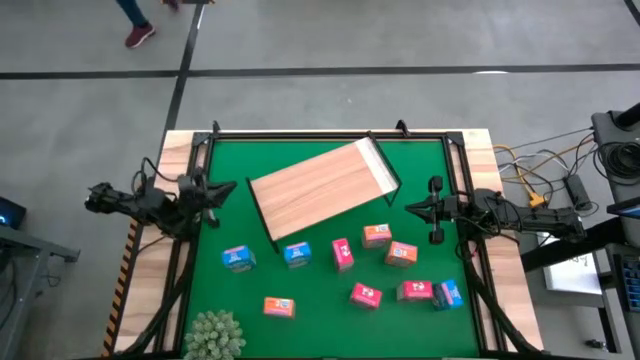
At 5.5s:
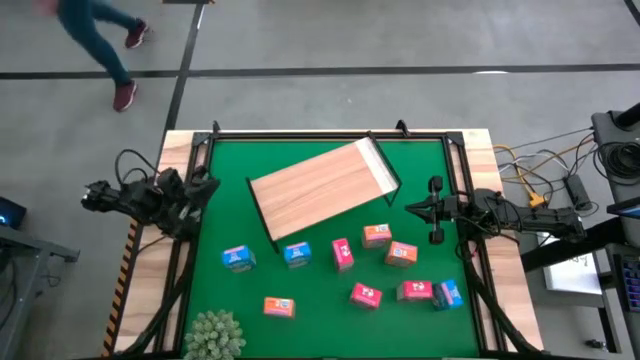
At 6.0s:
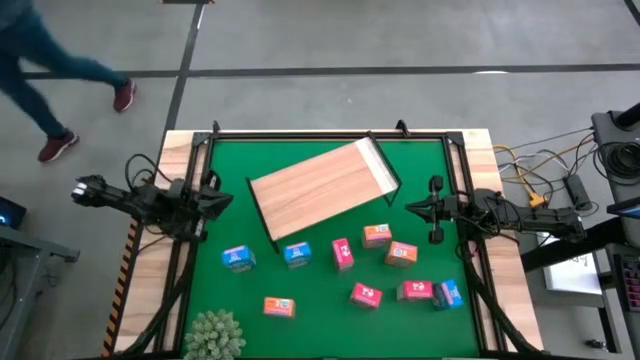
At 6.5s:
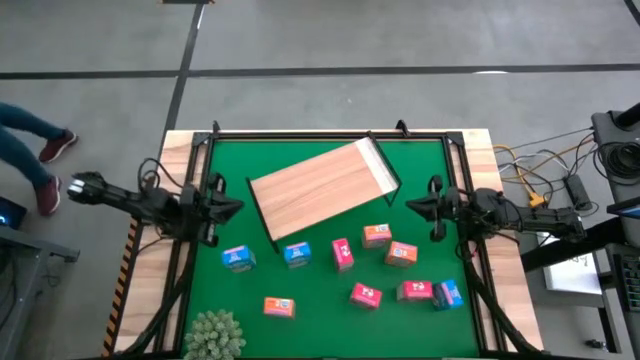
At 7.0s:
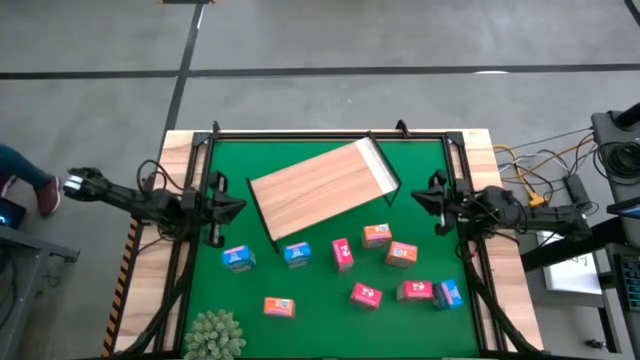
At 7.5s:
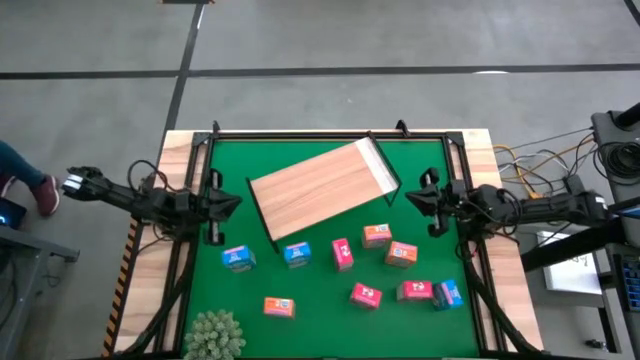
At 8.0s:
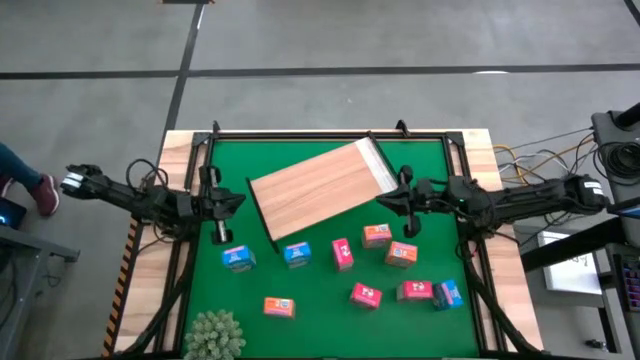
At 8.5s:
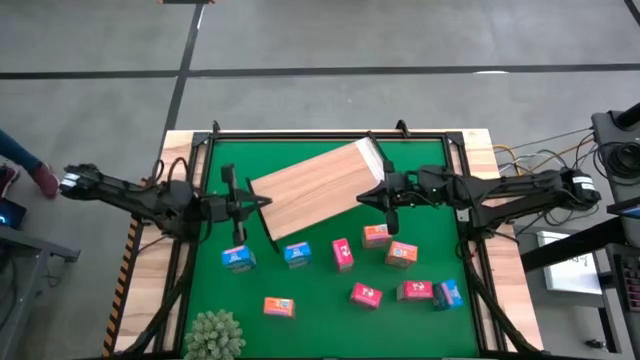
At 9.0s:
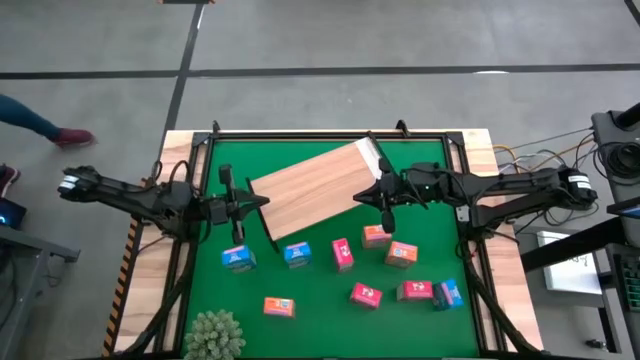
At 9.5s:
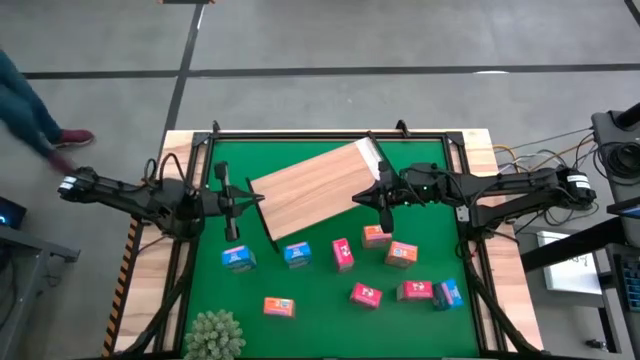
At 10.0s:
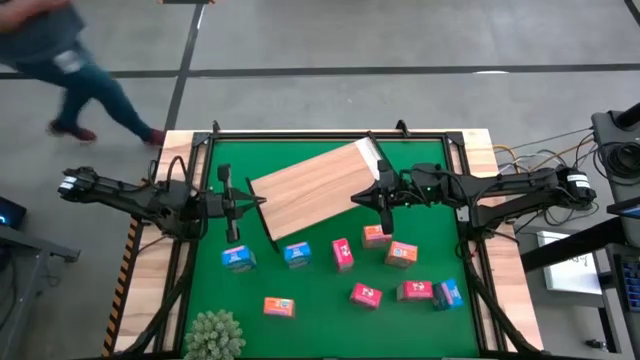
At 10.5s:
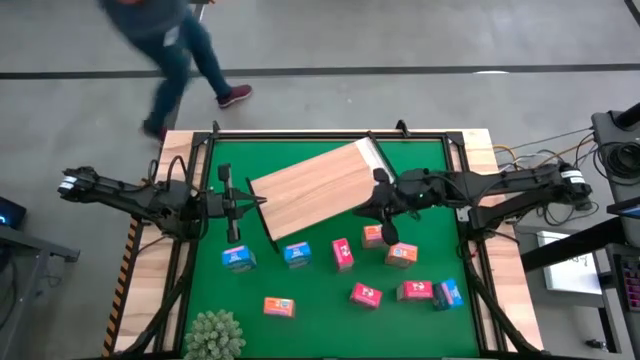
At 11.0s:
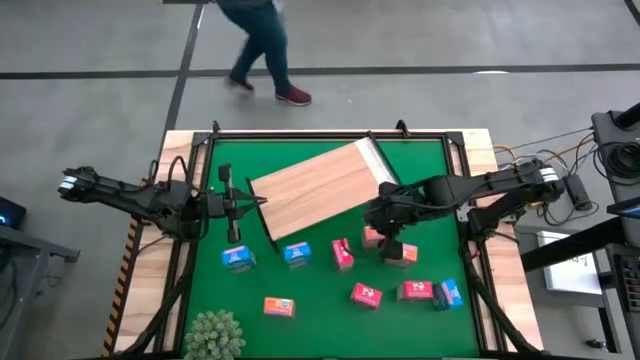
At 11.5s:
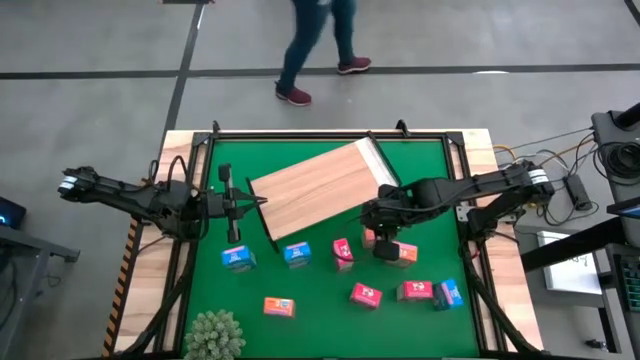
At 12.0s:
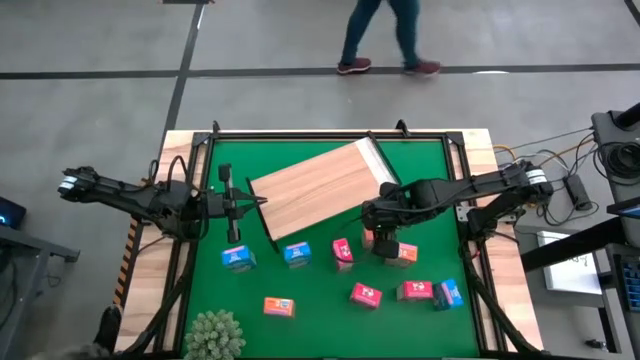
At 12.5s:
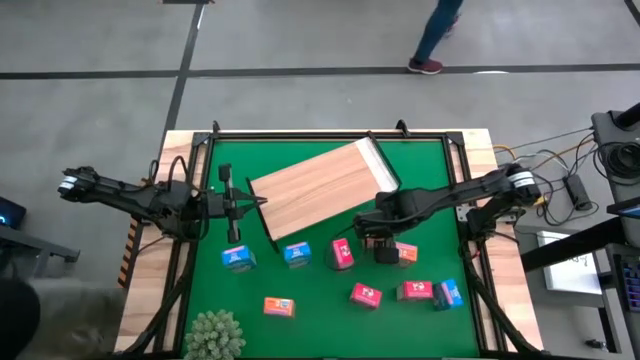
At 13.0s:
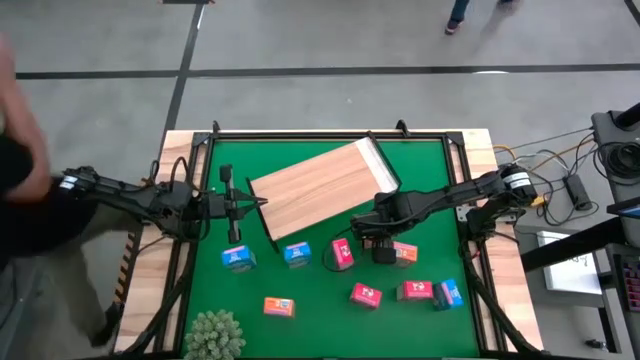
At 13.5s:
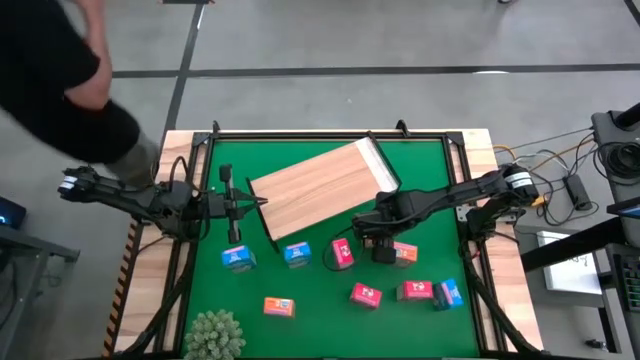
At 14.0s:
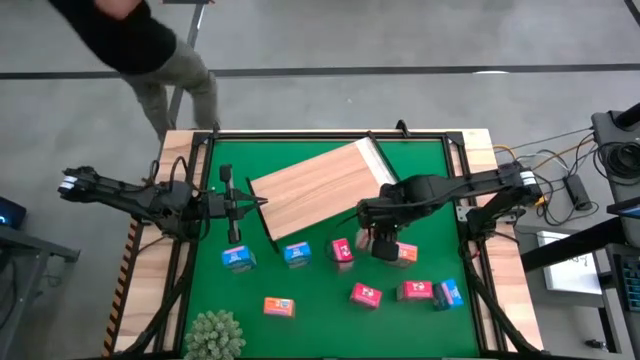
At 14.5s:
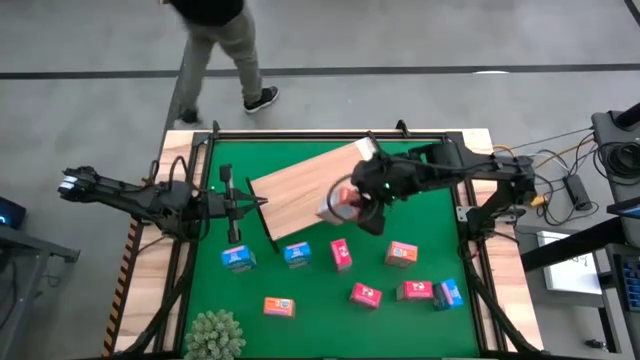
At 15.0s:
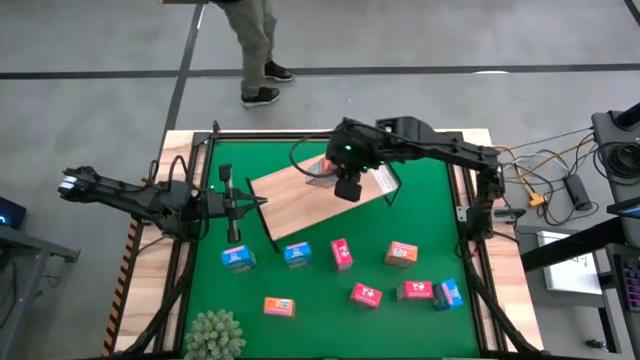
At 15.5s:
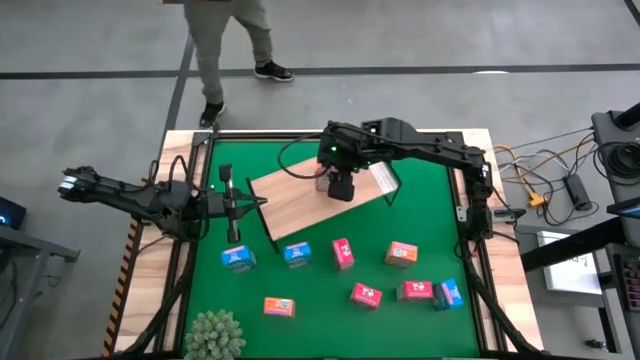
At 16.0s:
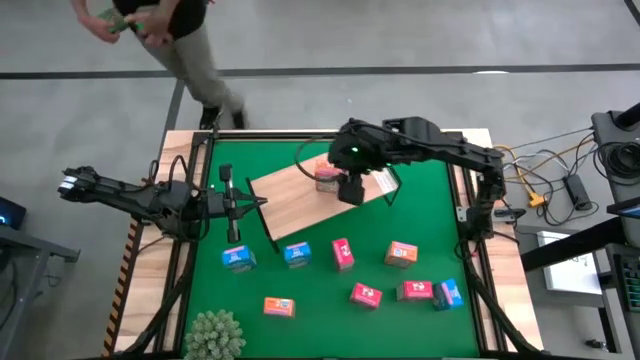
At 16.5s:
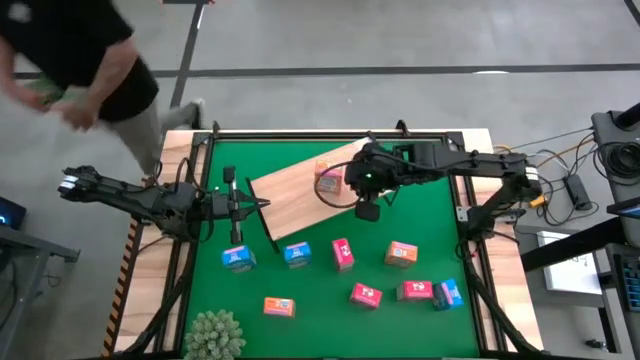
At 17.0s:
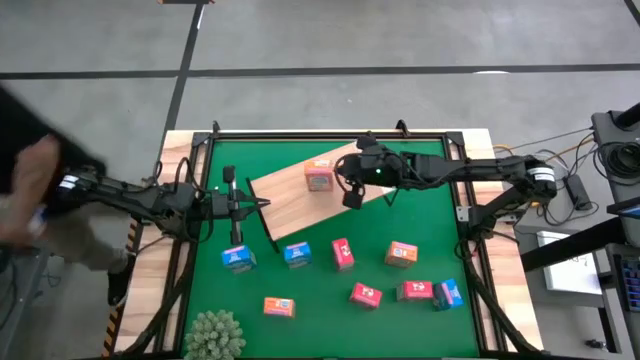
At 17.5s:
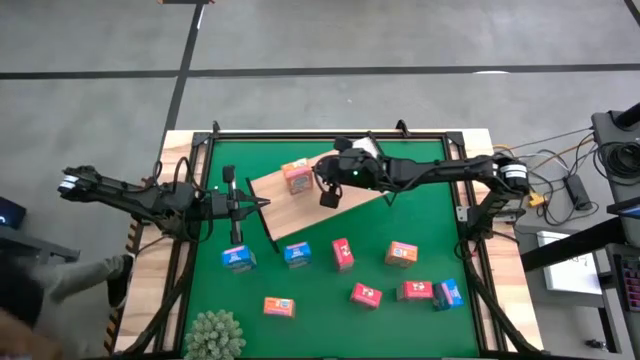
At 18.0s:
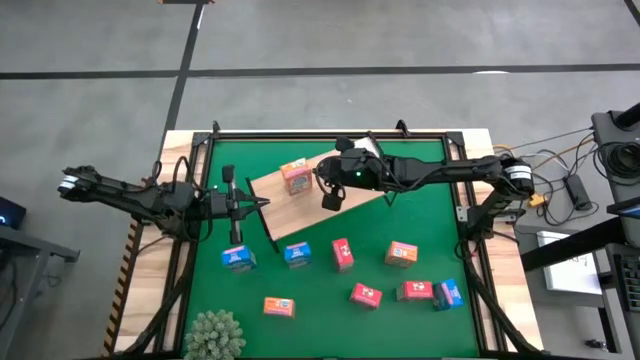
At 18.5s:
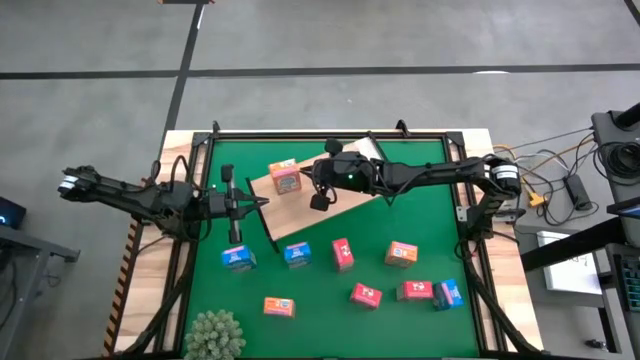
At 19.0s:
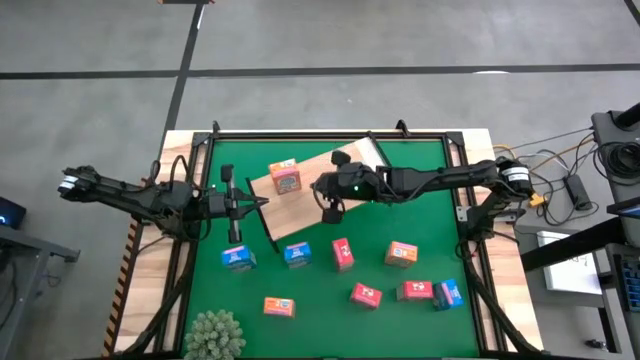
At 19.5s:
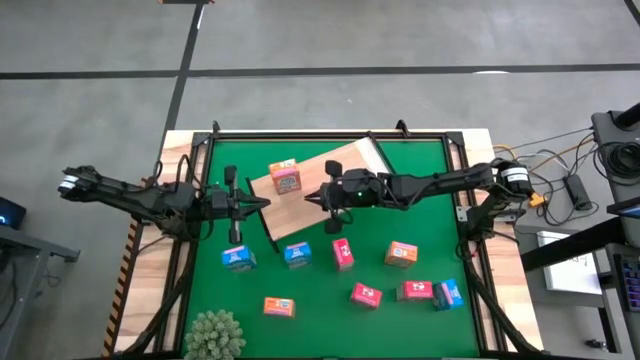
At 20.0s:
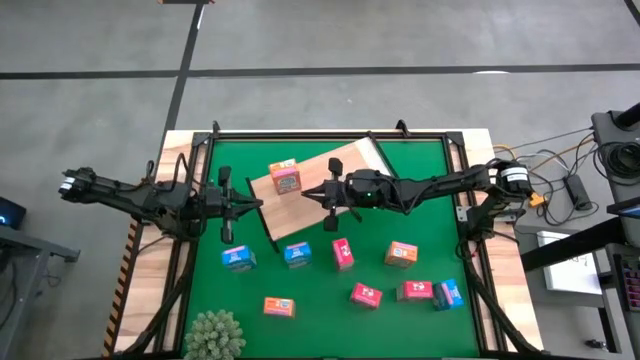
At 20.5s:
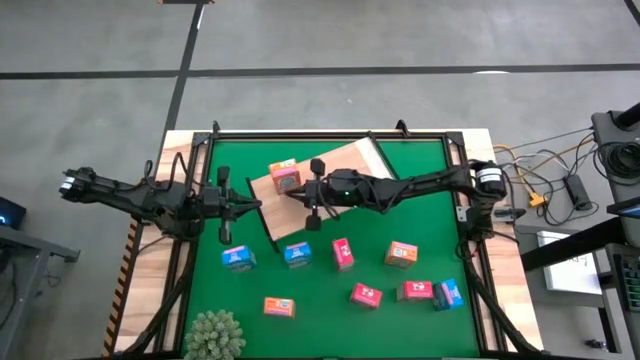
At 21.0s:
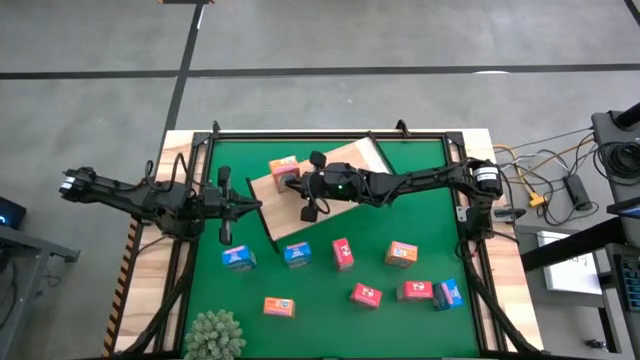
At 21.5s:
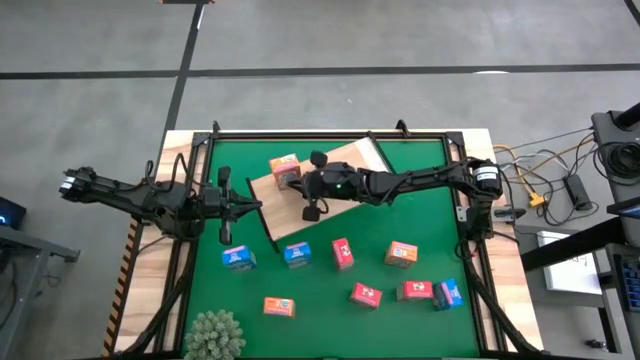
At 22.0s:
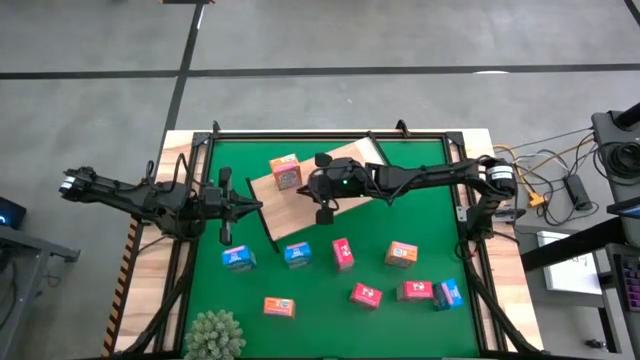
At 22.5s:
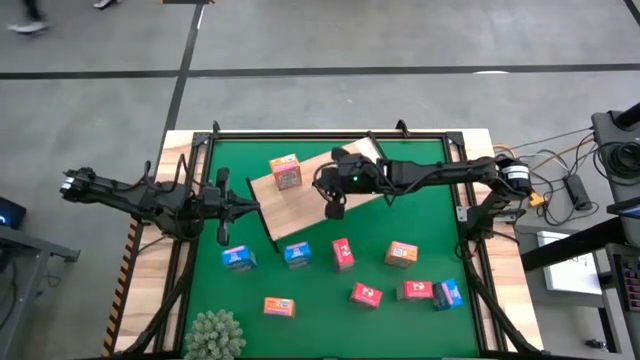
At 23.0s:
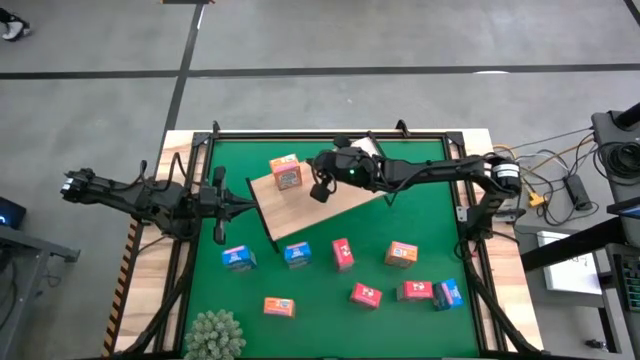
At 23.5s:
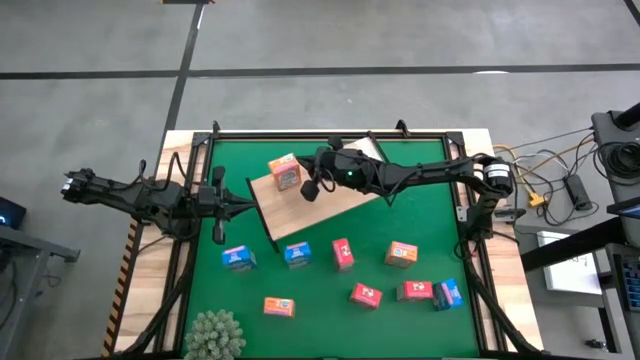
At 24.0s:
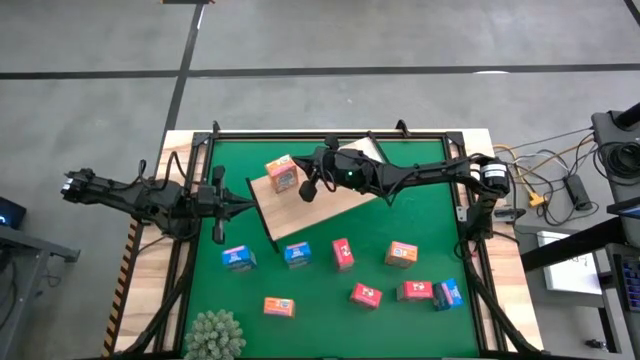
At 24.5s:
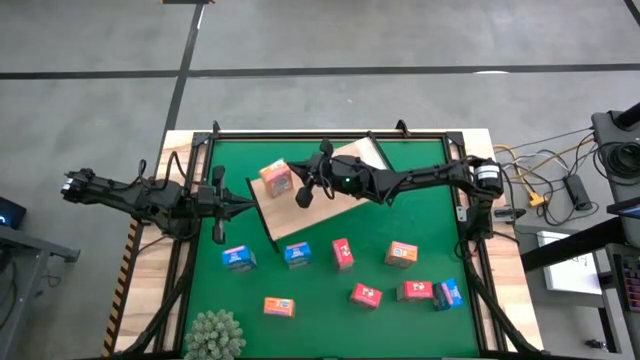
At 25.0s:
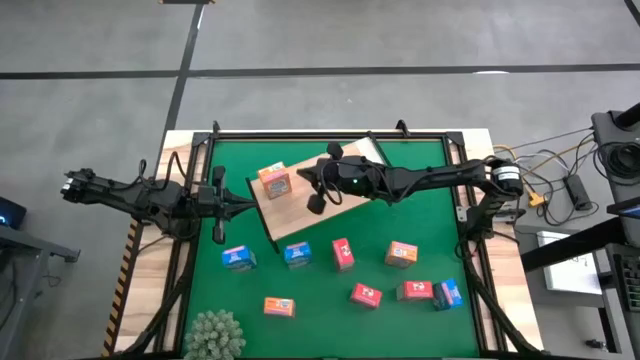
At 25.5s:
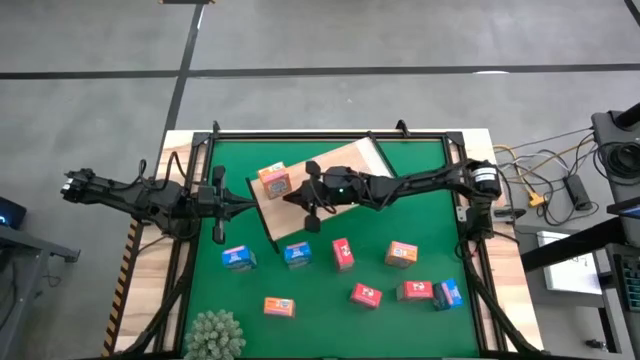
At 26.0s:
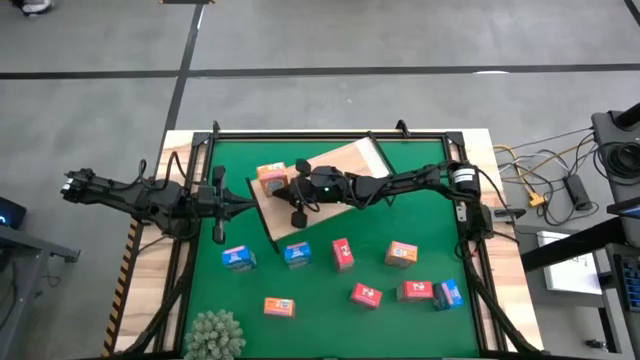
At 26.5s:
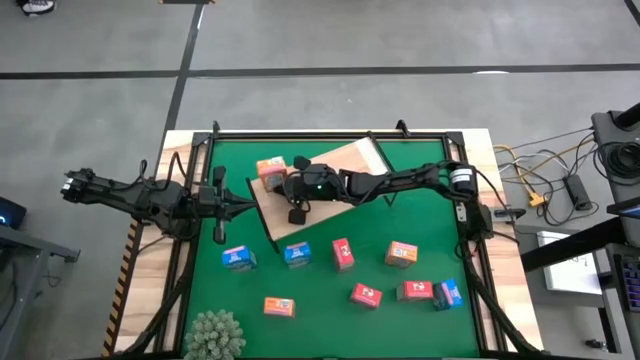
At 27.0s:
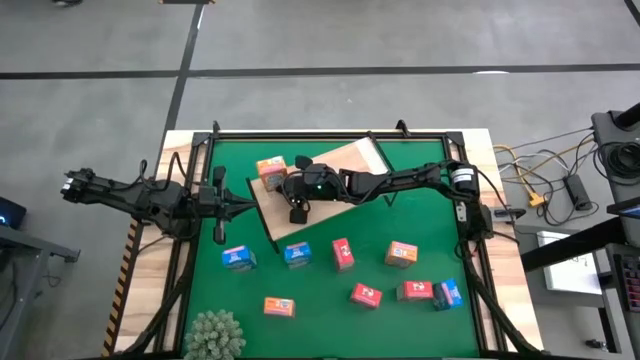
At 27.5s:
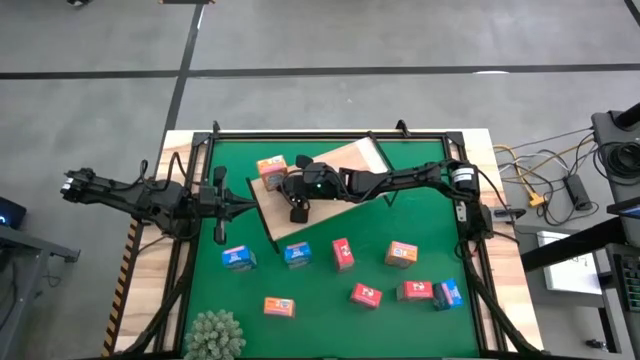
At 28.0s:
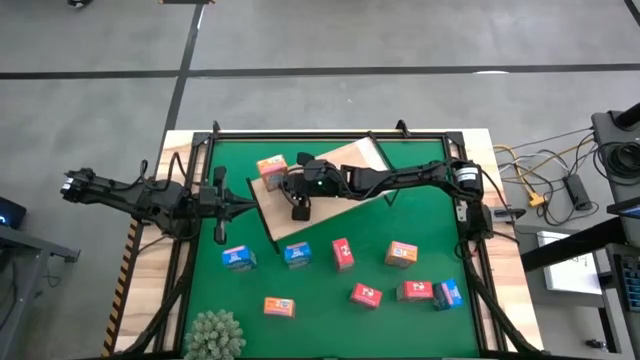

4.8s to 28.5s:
Task: Stack cereal on shelf
Put the top middle orange cereal box on the shelf
